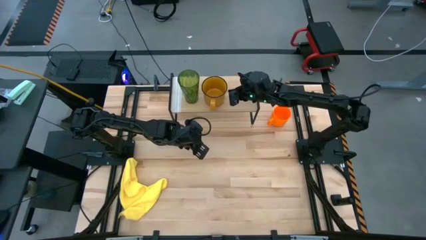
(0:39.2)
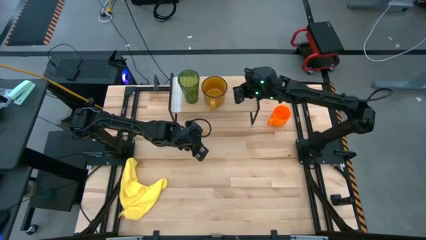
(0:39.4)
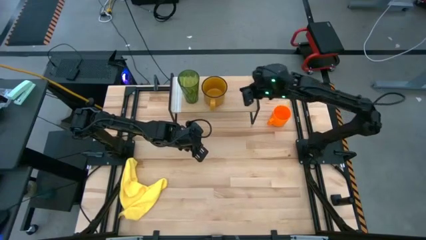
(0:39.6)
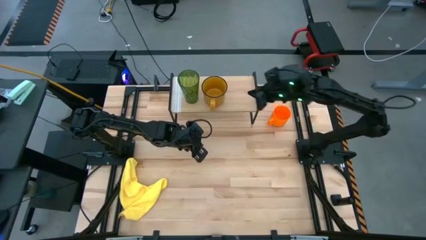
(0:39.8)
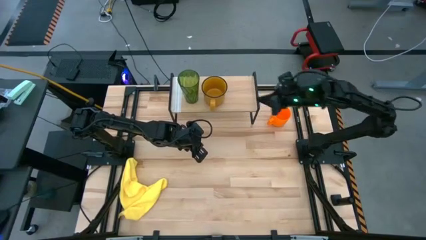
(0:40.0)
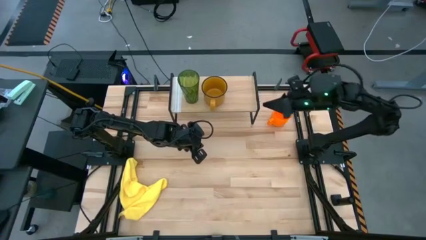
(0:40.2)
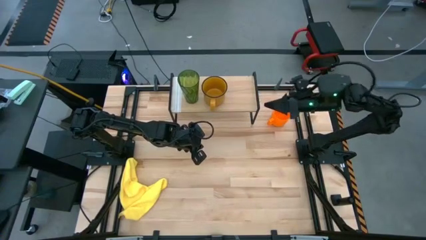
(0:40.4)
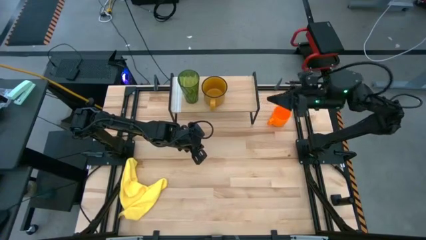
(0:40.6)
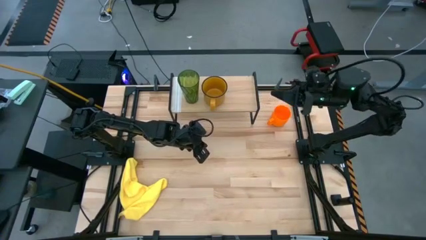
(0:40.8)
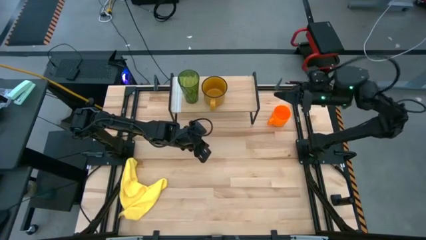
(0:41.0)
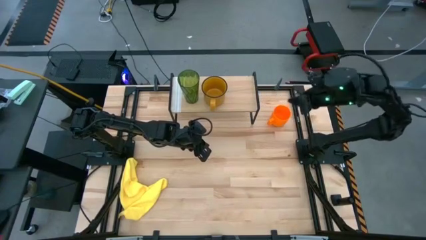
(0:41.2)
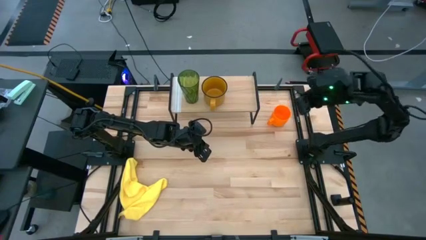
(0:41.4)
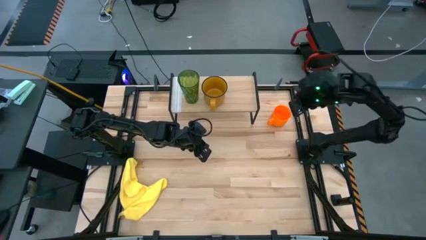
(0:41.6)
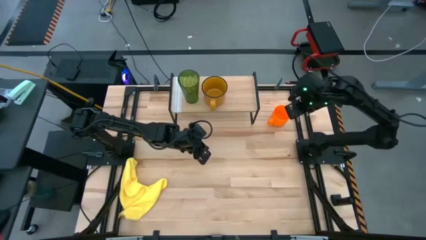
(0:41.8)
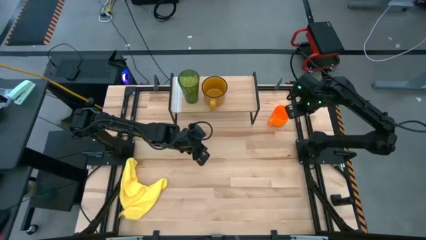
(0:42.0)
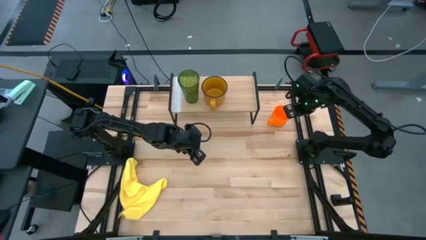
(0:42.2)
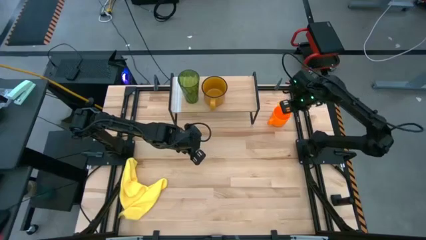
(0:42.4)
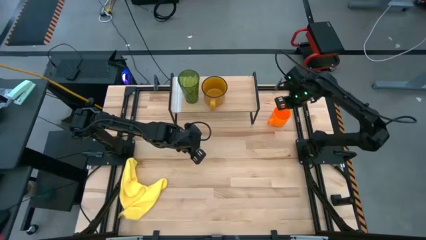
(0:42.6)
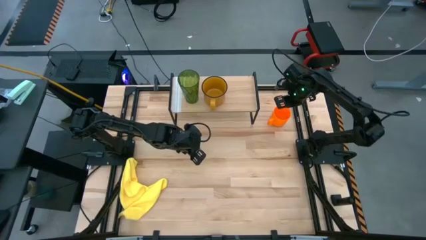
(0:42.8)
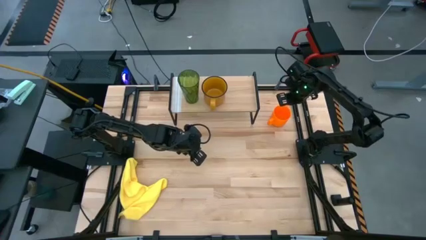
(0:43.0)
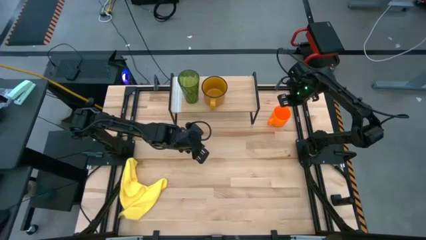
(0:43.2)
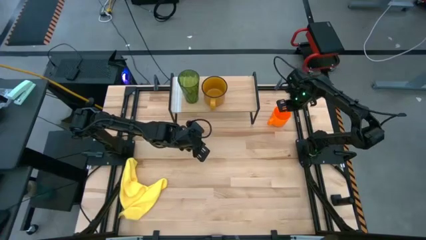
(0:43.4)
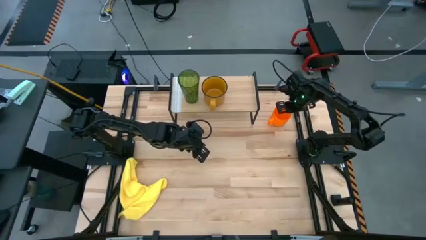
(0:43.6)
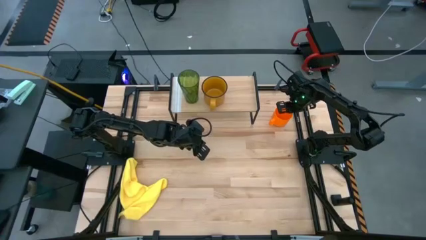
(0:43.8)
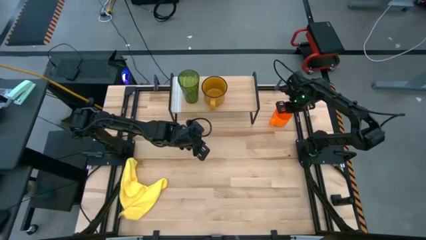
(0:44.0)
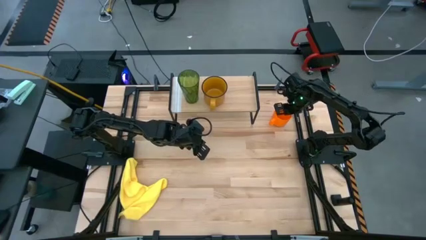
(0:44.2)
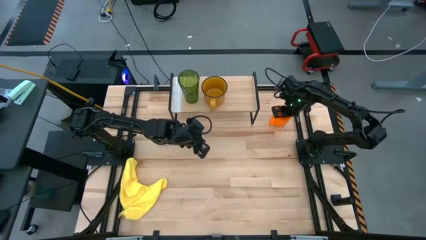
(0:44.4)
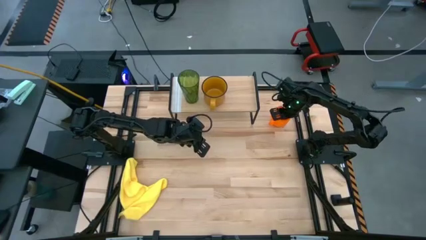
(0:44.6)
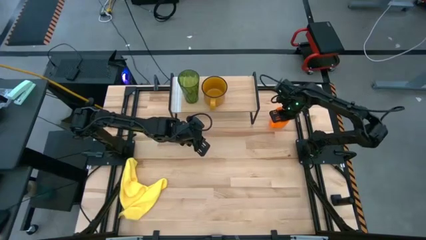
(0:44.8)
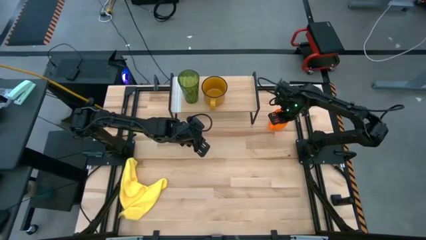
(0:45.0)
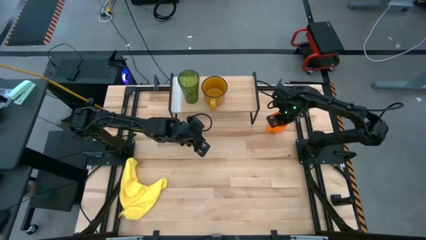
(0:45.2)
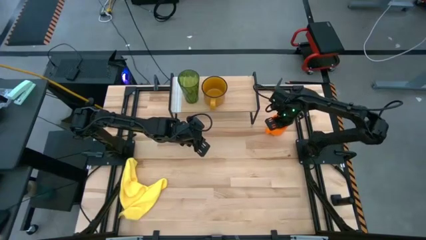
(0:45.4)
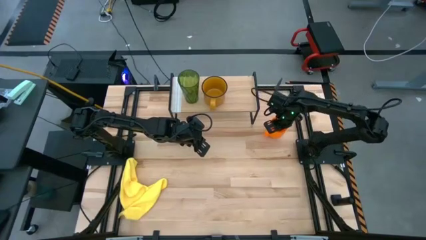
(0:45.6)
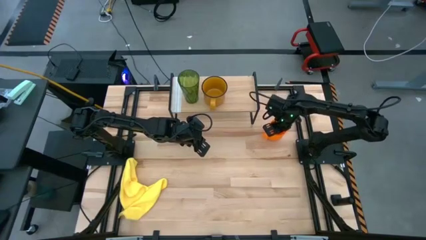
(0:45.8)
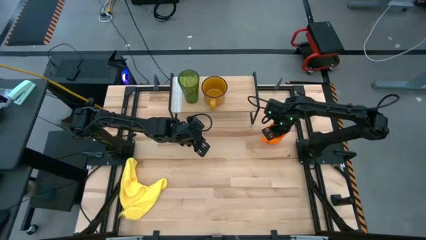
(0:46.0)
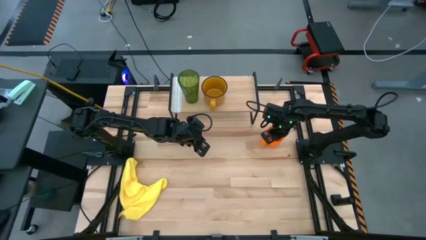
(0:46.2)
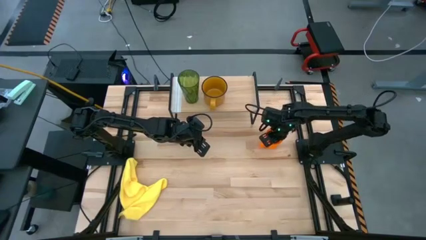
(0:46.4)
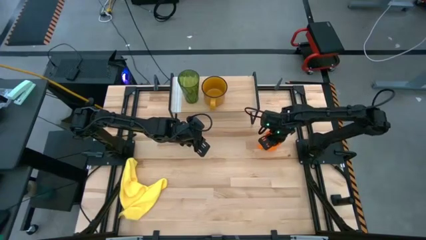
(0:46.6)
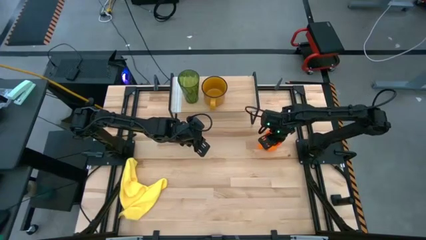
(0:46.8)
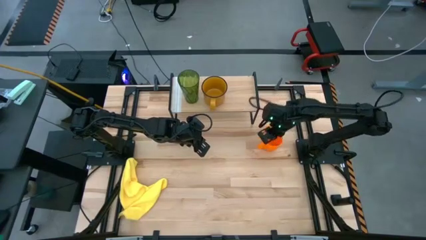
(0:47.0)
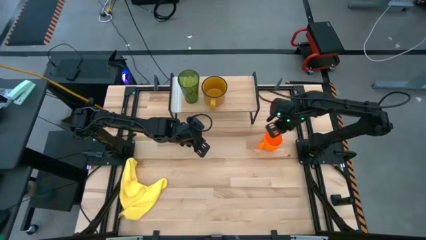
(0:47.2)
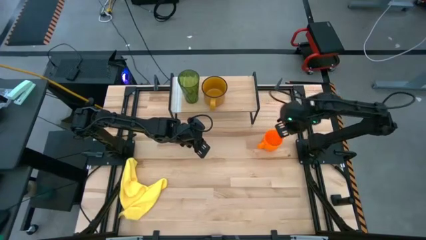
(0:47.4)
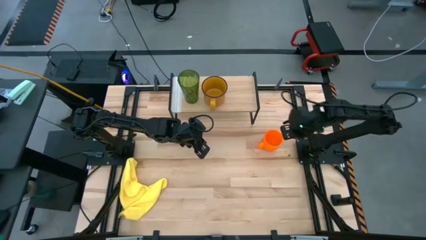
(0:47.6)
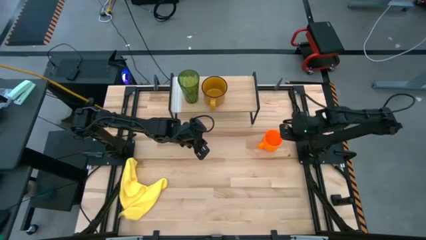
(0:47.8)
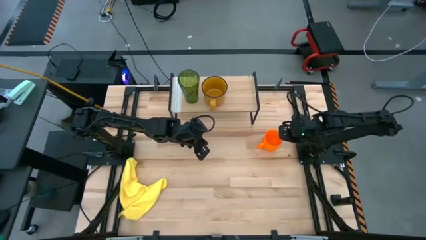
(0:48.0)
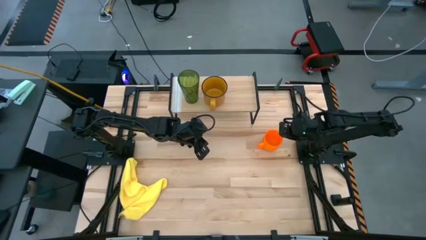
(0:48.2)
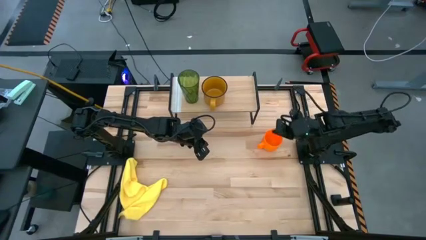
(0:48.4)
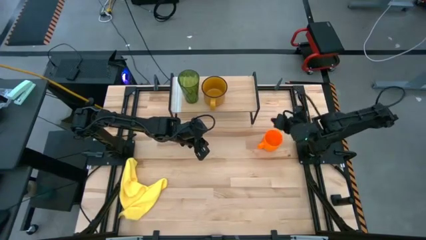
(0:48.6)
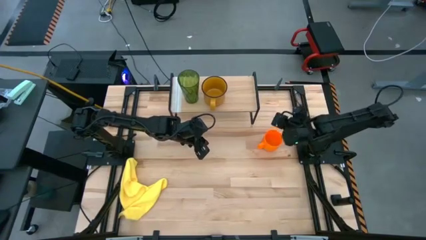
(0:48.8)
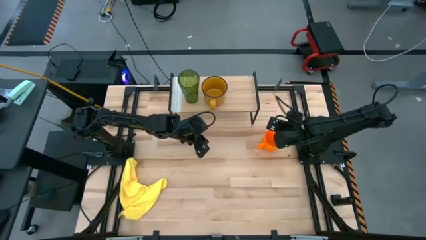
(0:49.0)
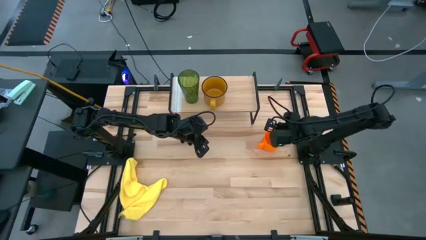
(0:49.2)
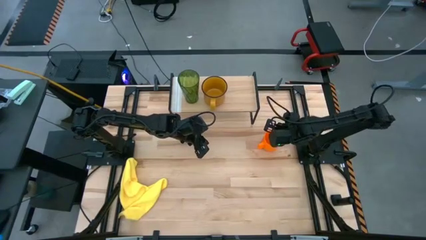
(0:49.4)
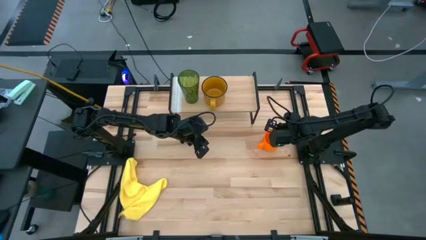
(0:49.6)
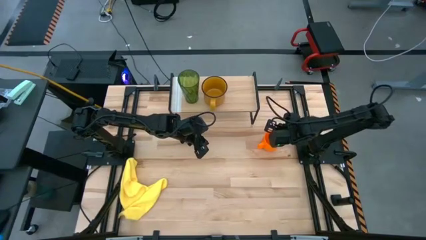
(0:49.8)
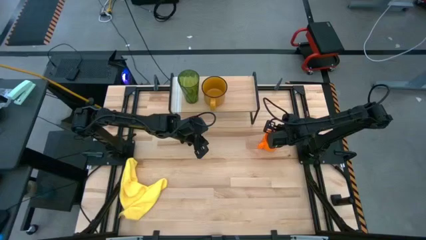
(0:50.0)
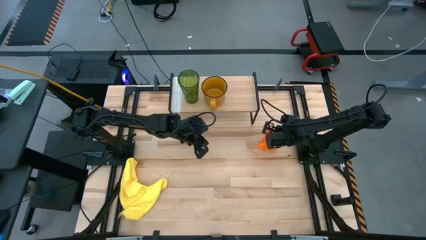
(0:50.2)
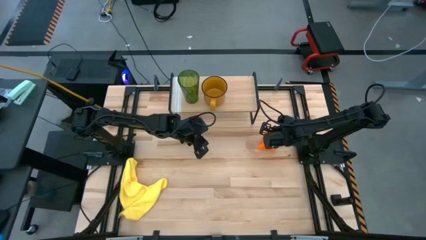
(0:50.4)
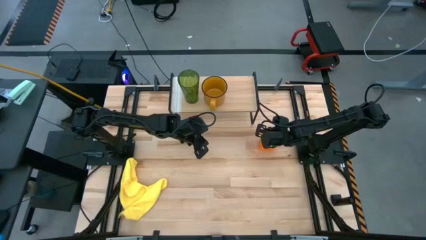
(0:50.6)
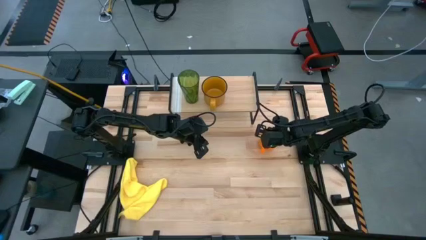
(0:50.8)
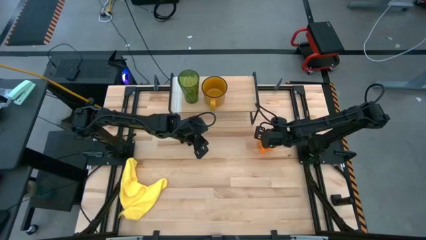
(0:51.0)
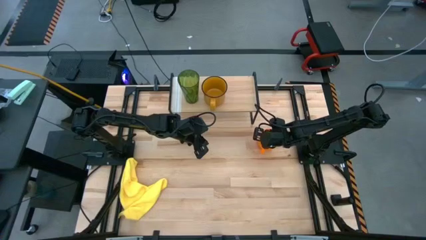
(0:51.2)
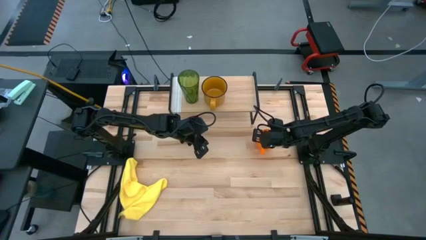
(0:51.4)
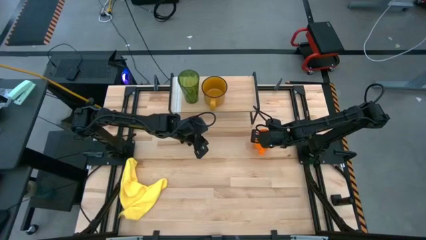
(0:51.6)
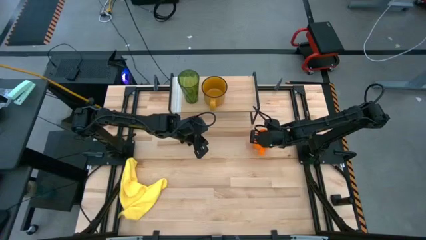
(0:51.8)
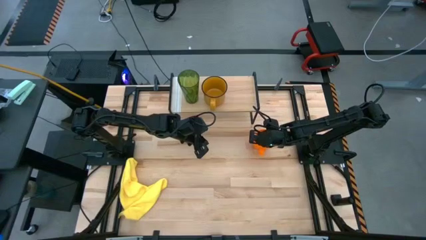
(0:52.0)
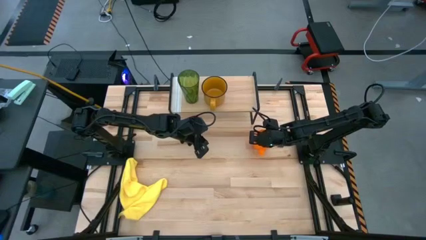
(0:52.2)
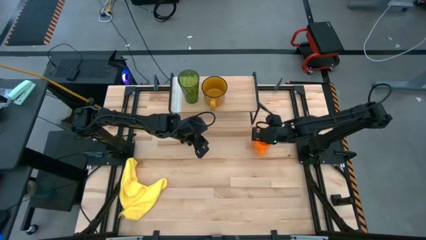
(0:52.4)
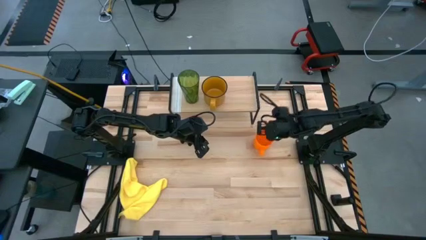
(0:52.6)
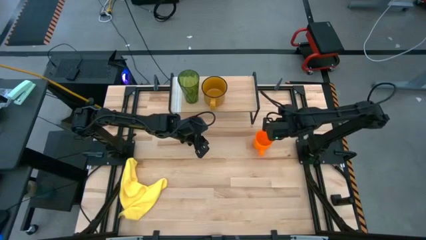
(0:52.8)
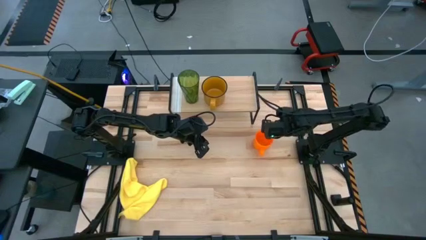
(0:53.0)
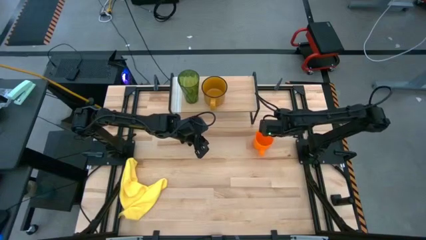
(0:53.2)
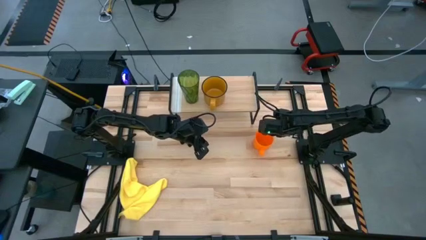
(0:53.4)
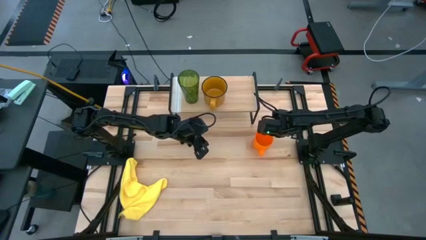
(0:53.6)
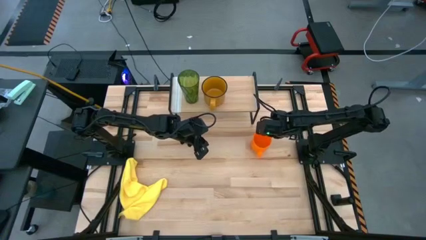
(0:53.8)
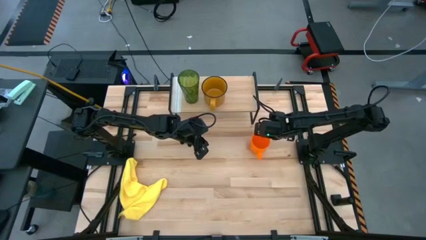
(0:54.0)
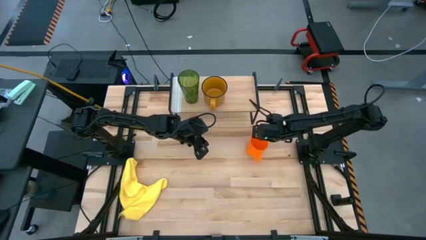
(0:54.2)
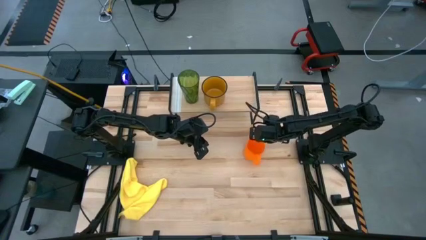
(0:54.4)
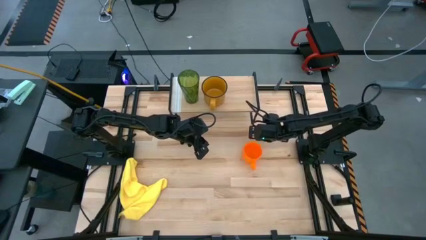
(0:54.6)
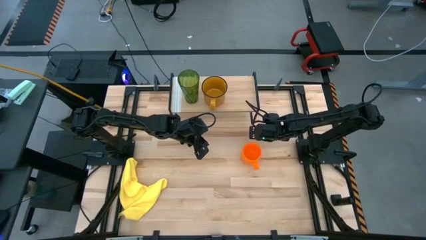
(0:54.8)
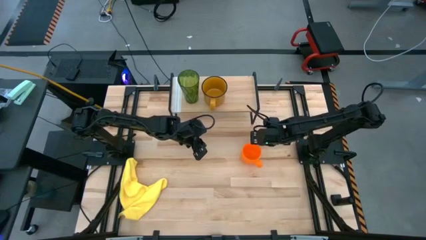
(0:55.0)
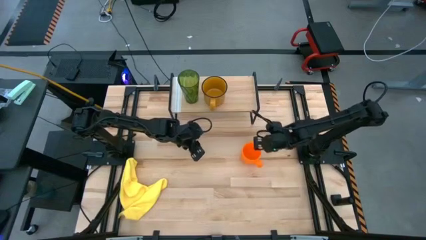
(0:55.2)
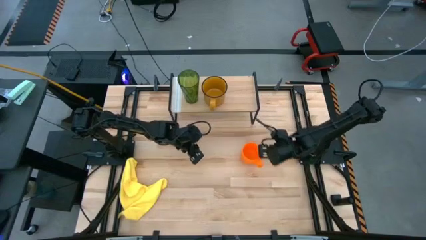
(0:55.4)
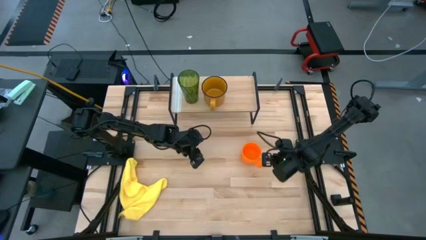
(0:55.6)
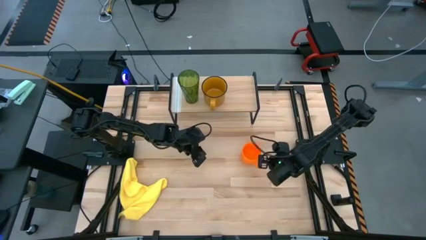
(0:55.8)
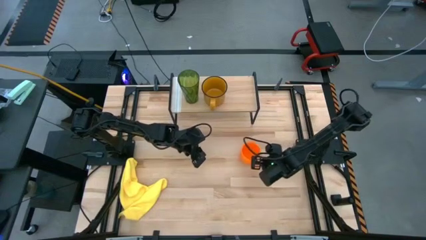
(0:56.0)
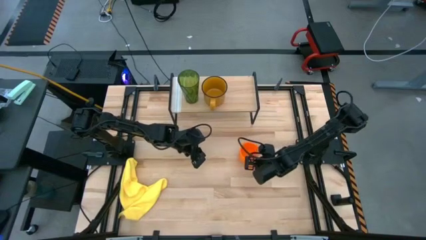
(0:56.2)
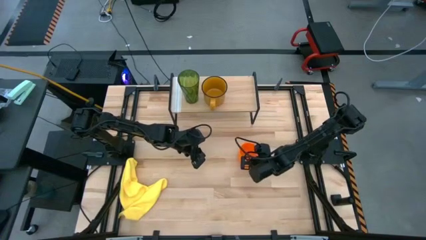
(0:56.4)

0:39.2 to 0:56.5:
Task: Stack small to large cups/mugs on shelf
Put the orange mug on the shelf
